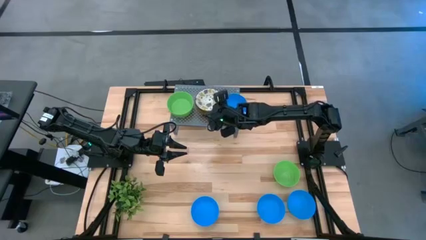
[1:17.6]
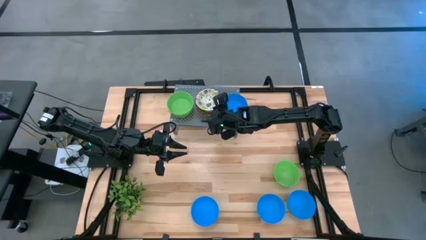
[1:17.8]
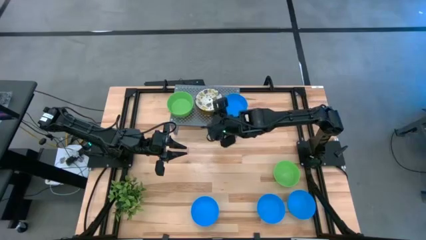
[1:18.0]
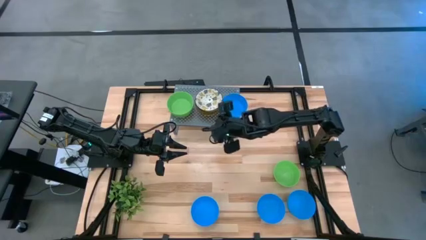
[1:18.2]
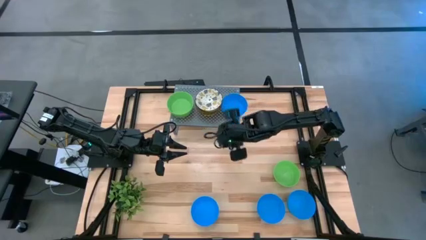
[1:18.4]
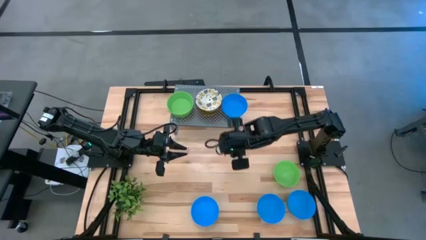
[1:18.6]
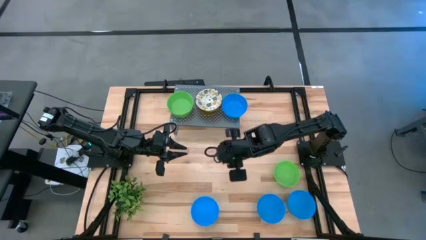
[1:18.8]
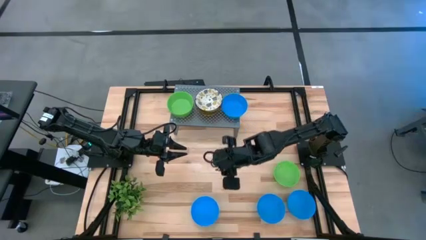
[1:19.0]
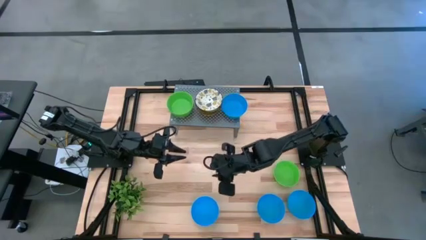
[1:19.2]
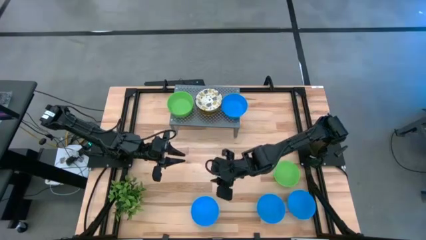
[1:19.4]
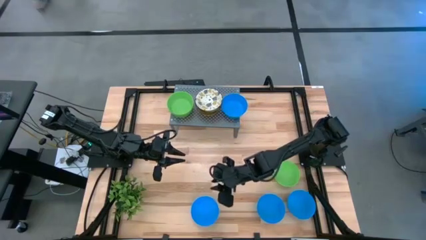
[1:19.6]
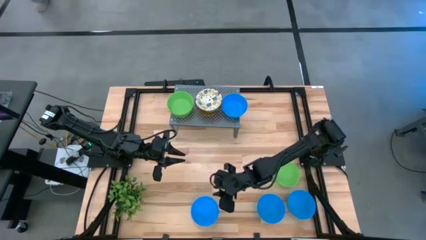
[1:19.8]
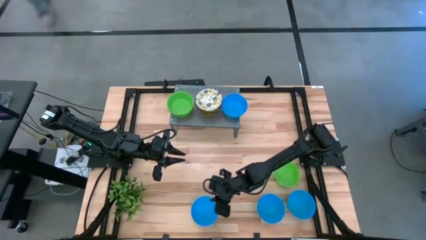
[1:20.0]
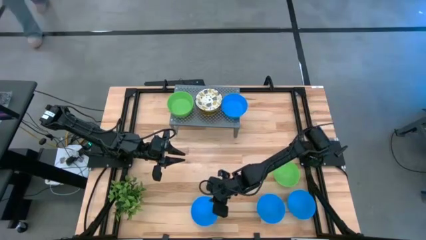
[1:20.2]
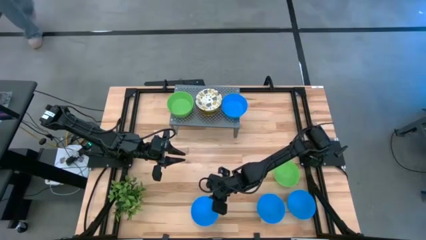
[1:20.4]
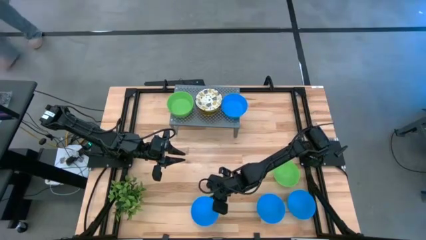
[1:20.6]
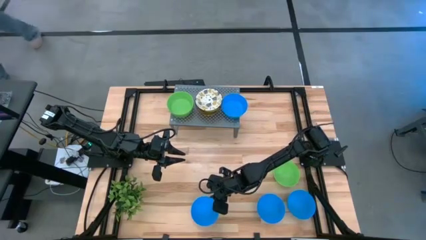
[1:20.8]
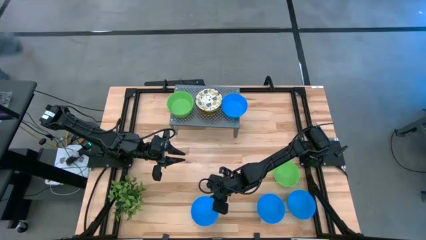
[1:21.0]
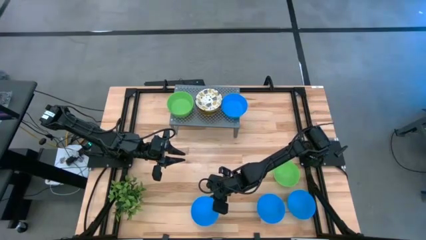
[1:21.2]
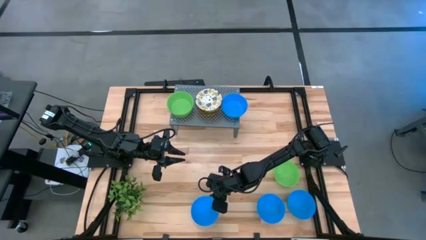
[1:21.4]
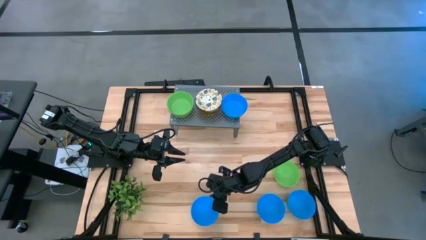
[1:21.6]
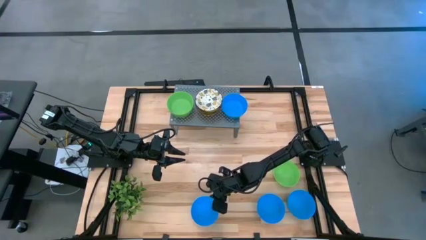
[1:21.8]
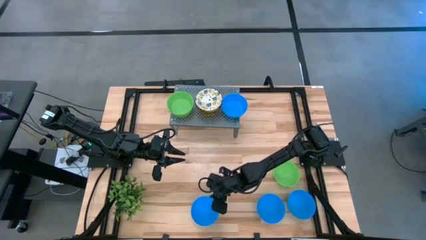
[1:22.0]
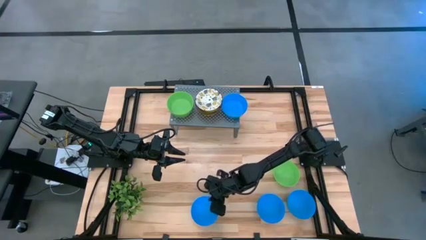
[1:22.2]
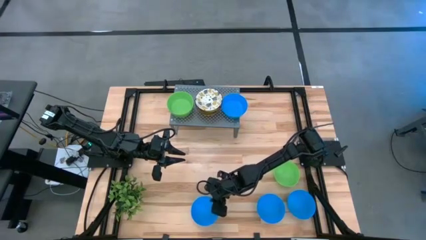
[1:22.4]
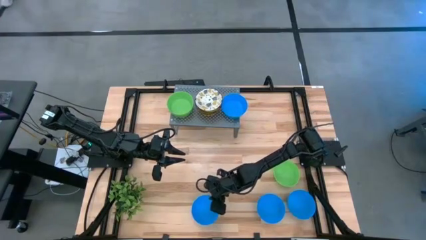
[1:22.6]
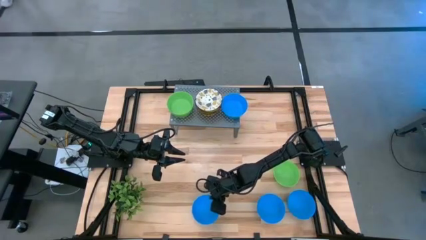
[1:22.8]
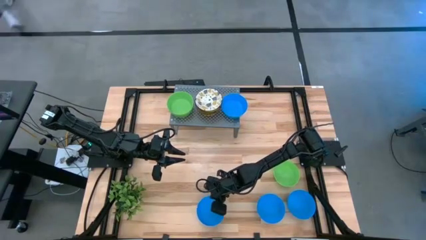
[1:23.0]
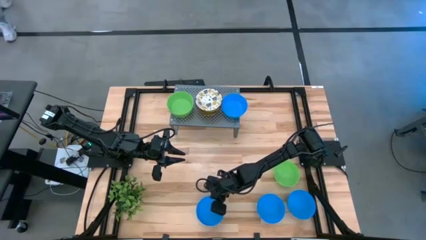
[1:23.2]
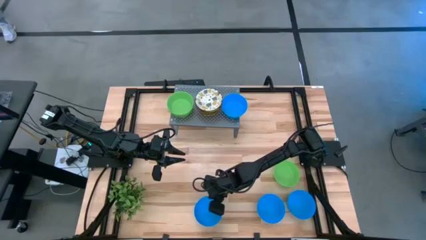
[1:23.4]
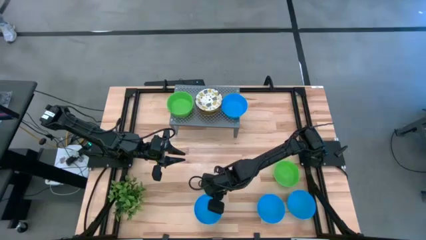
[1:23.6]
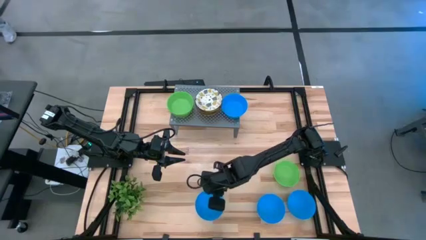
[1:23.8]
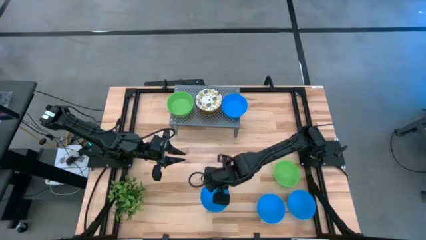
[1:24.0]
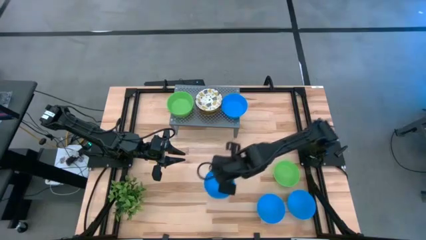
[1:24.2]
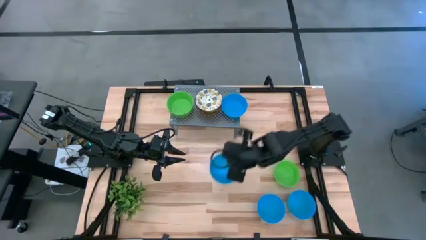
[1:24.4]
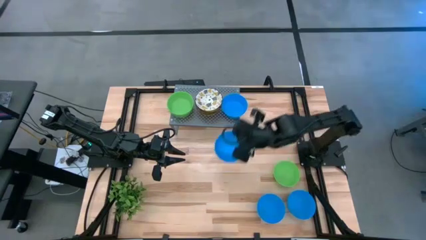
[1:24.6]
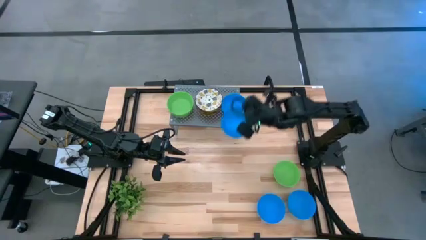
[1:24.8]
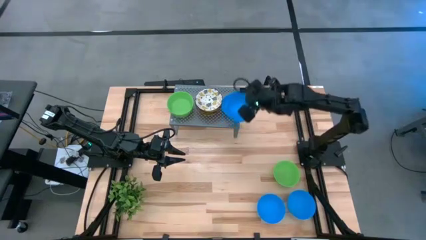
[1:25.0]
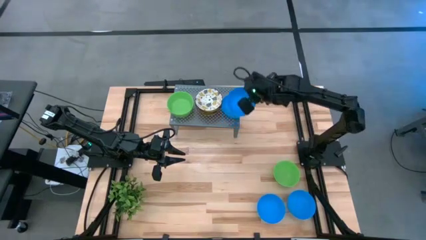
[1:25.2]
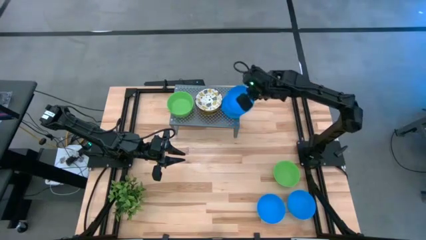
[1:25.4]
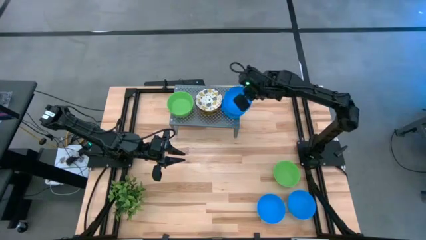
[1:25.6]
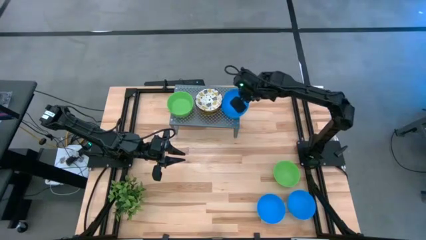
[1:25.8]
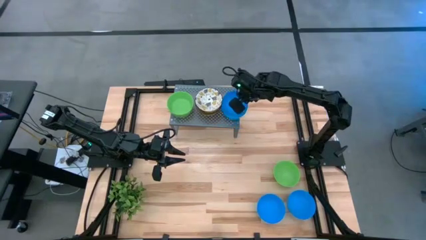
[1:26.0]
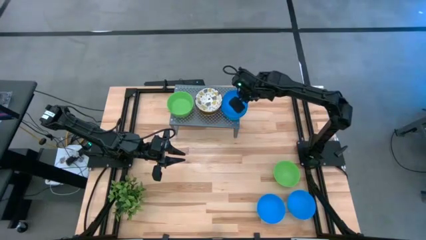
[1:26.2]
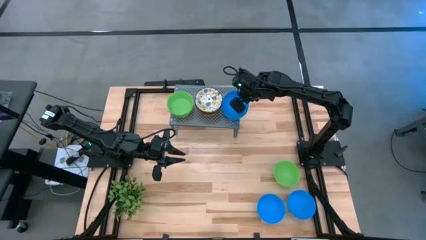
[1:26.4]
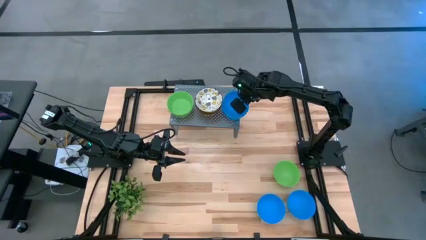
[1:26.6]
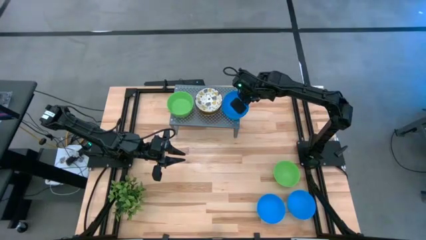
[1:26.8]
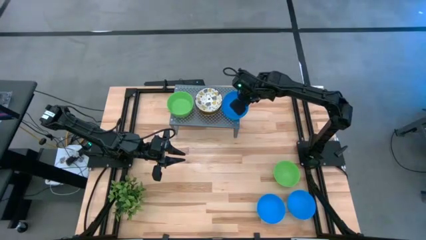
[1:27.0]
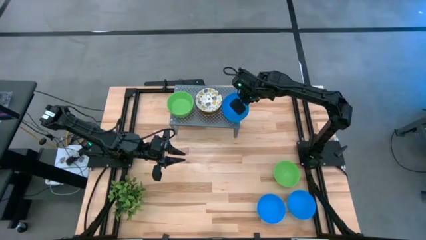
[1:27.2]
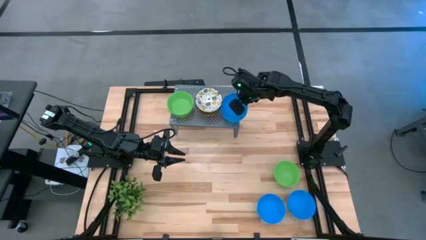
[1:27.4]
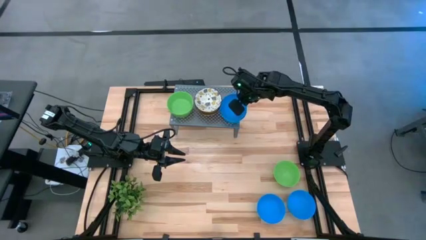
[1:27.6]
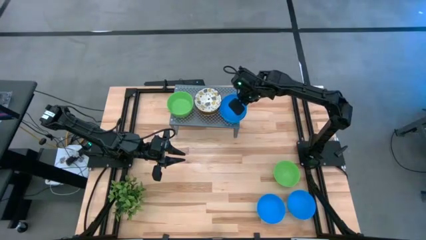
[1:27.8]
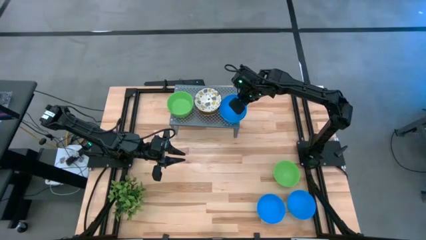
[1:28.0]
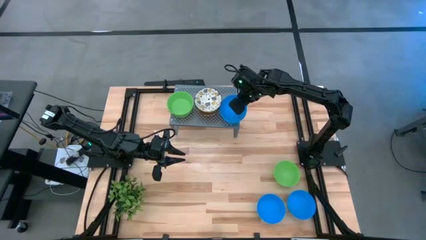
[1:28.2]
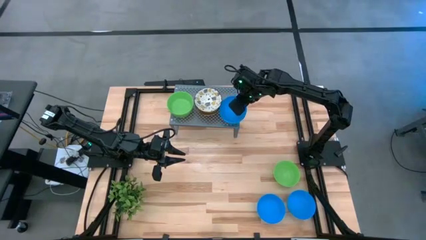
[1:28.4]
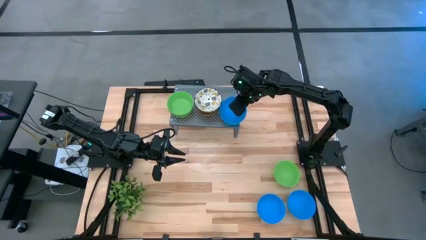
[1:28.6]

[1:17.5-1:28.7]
Task: Pick & Place Mini bowls
Stack the blue bowl on top of the other blue bowl on the shelf

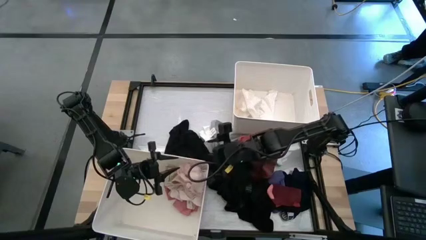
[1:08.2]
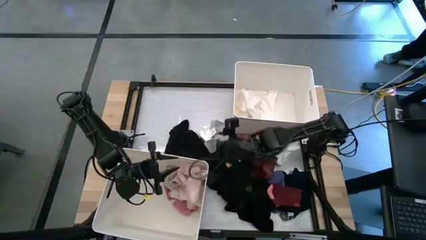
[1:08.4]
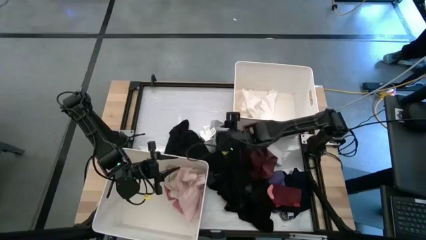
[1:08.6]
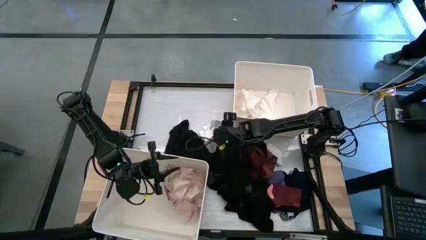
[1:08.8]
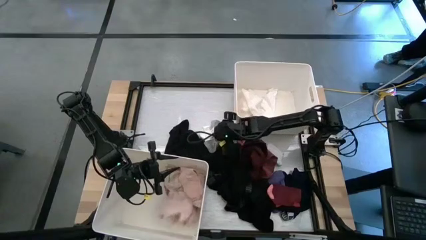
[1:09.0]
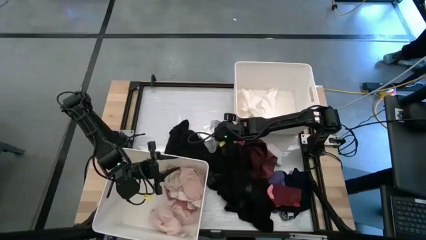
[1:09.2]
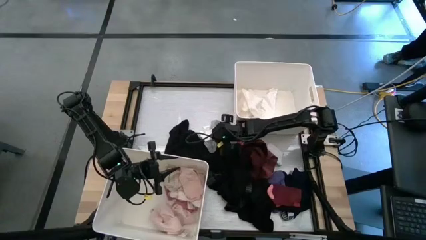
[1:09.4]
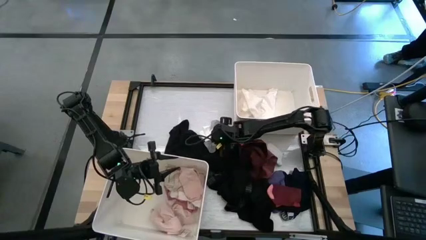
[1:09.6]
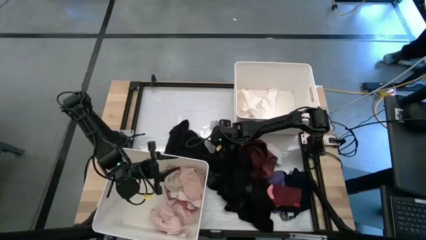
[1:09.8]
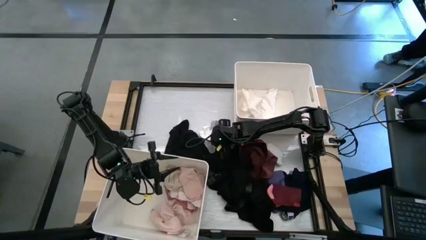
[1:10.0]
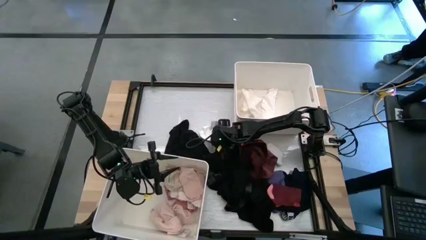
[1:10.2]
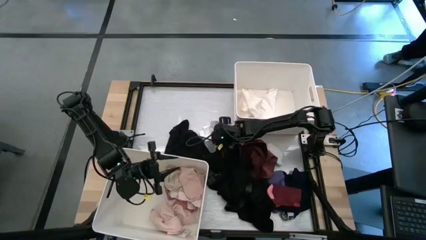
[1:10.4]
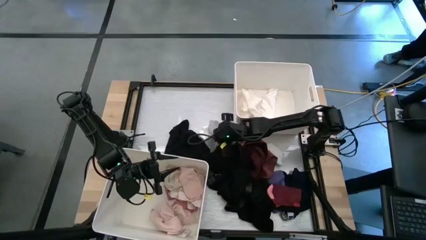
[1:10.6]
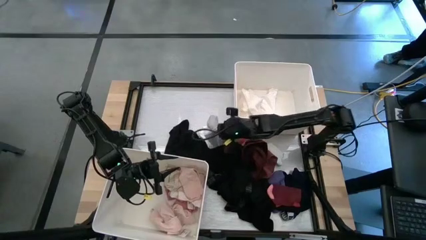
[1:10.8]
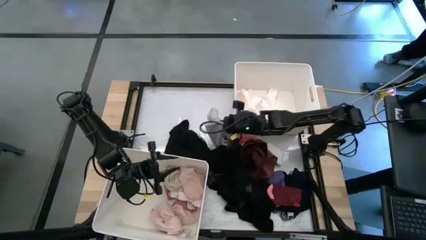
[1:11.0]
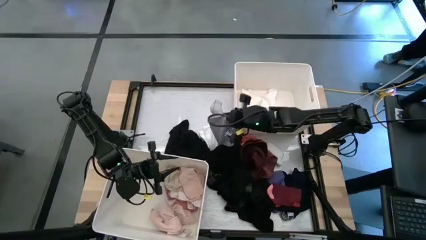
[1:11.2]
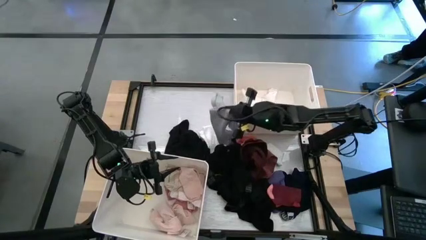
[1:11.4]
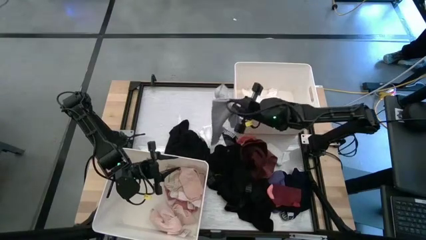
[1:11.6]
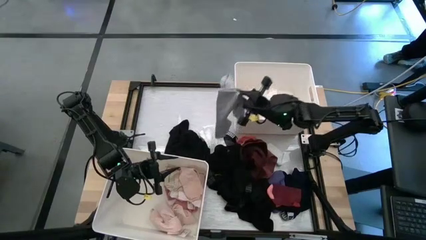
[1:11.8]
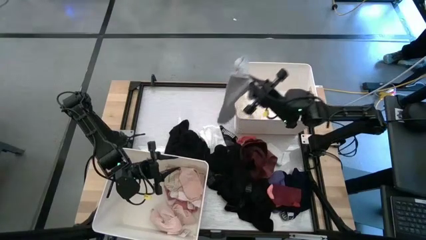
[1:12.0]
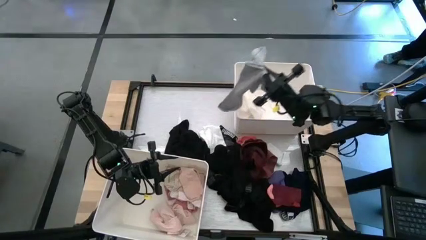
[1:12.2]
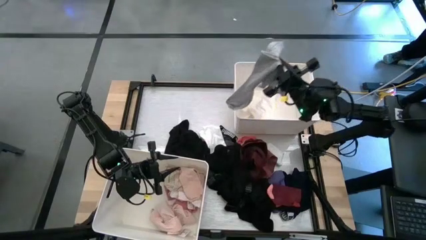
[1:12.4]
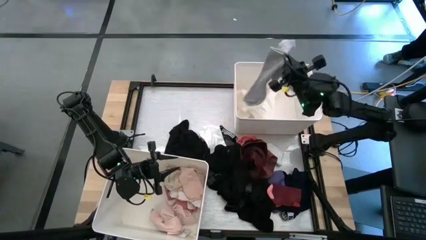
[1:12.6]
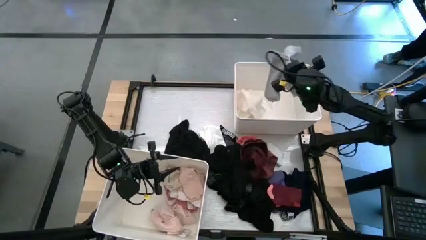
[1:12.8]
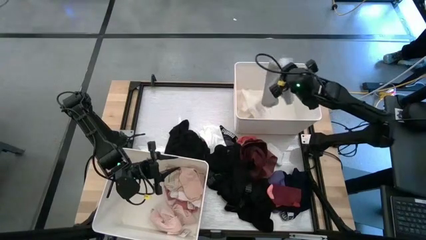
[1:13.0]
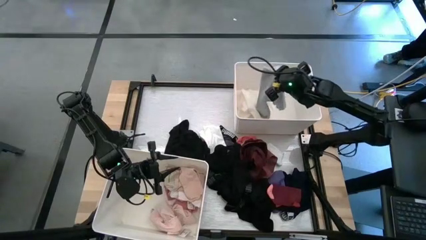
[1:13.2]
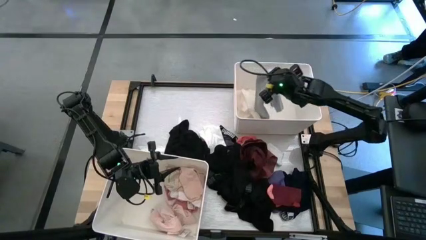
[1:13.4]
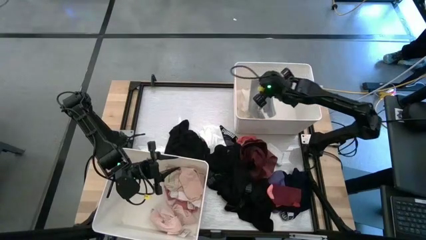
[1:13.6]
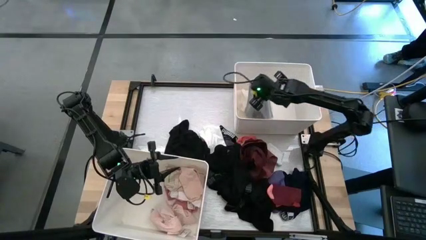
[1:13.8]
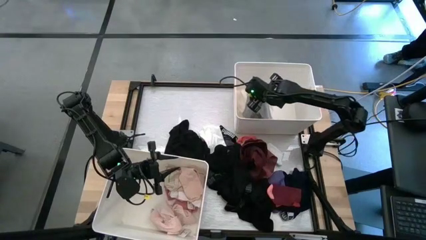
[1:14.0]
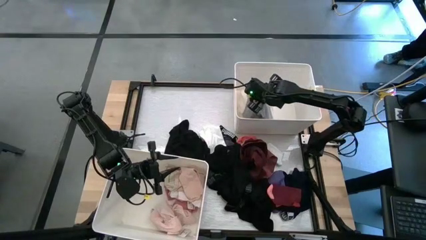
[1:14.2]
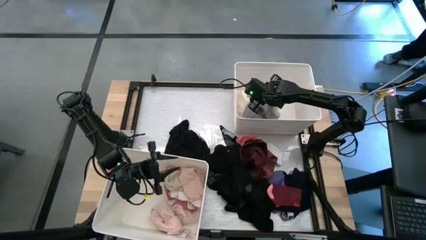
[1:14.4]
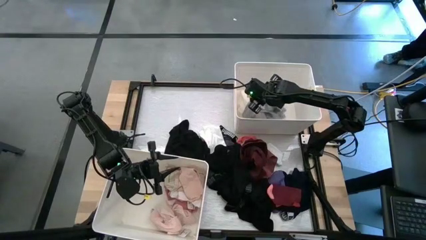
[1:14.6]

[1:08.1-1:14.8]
Task: Sort clothes
Put the gray pants into the top white bin
